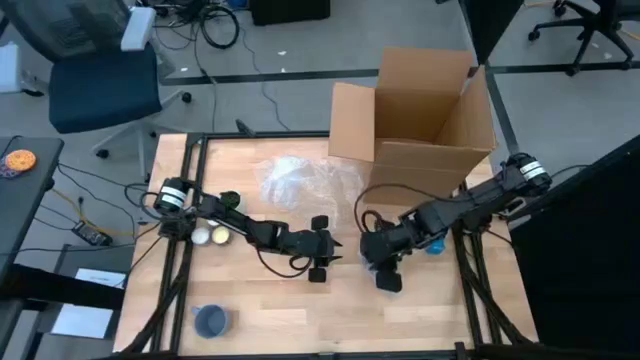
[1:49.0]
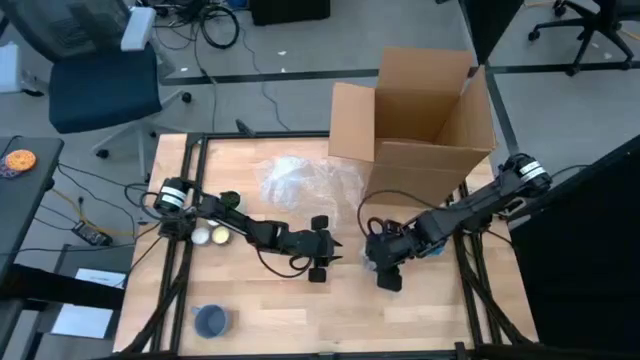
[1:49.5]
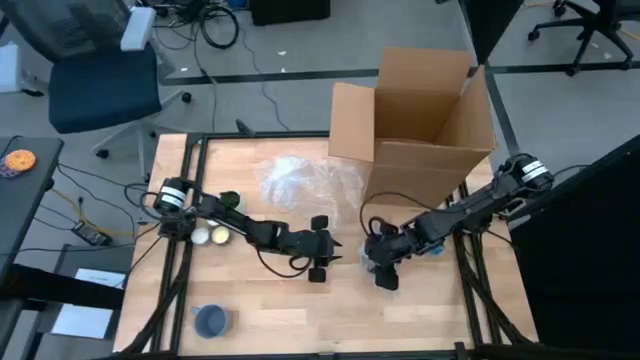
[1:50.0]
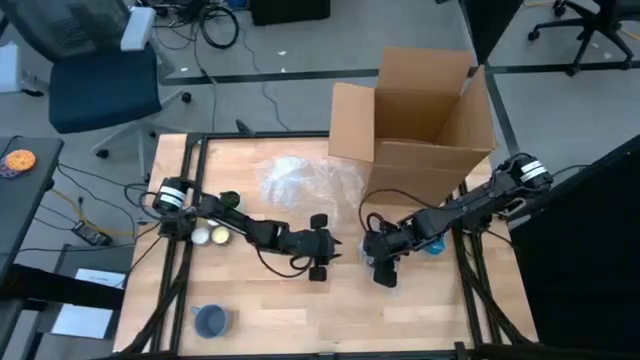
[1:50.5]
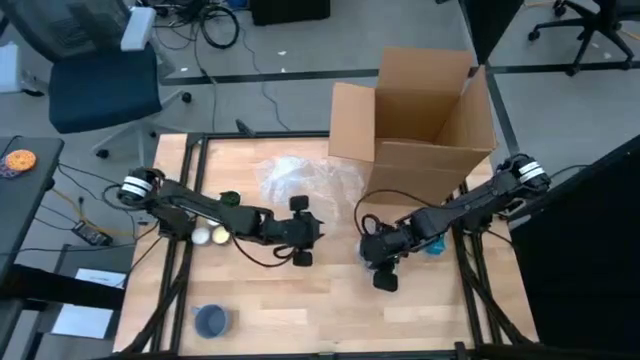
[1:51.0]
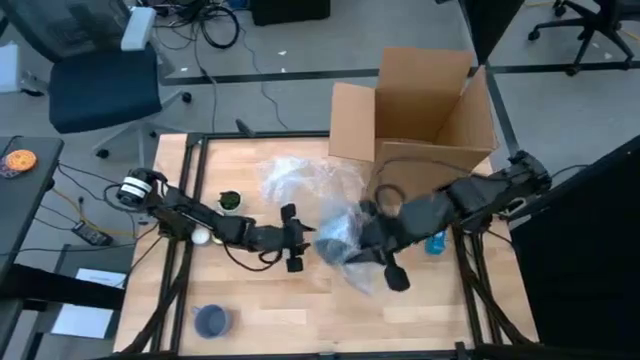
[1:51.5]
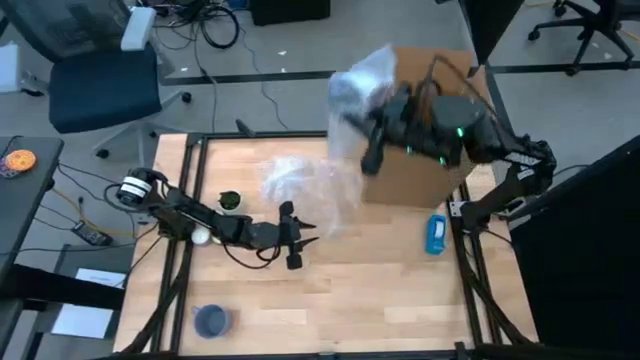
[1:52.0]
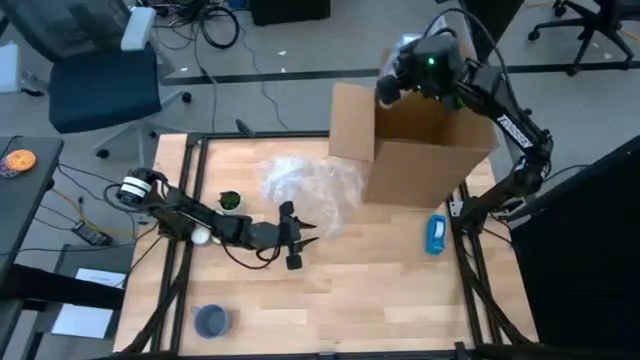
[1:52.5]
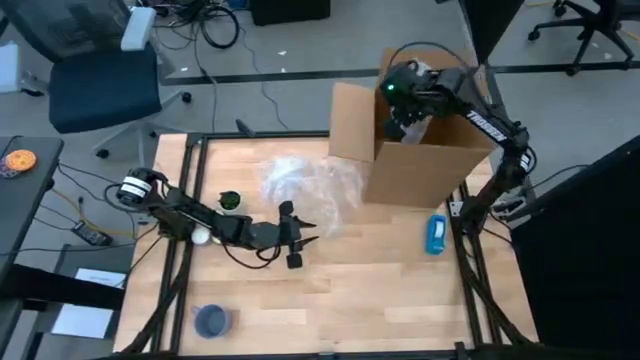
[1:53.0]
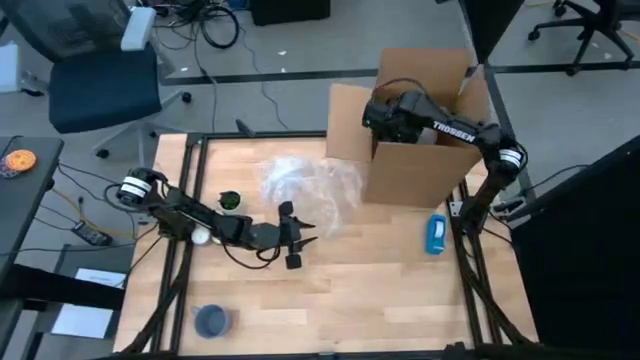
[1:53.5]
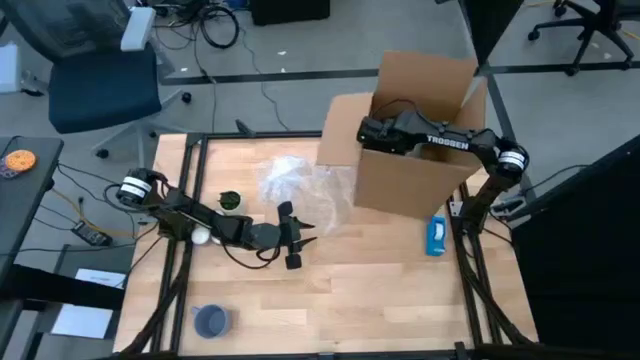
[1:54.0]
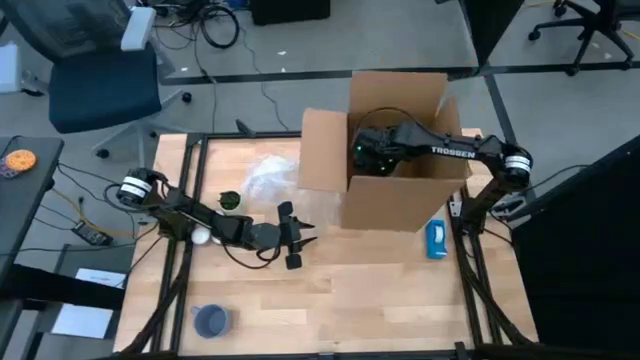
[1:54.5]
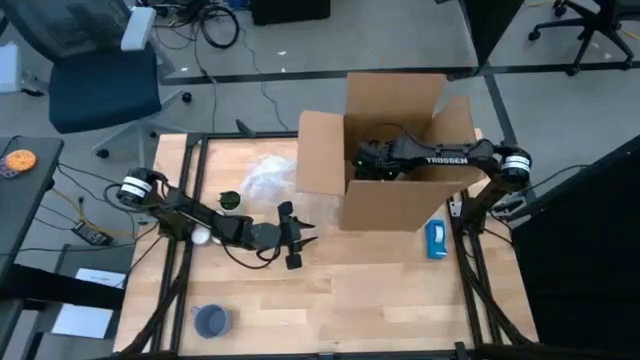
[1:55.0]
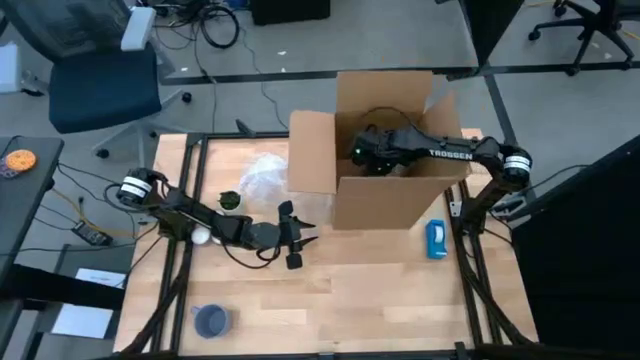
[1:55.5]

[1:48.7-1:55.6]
Task: wrap mug
Put the wrapped black mug into the cardboard box

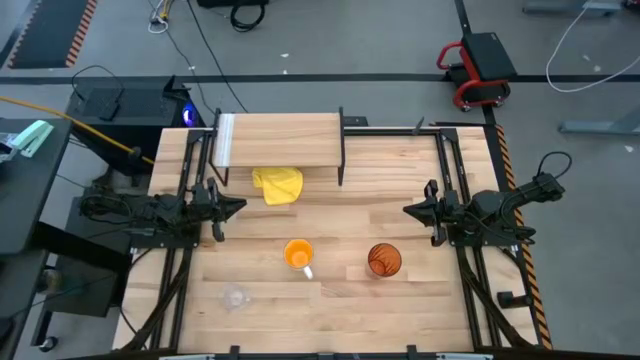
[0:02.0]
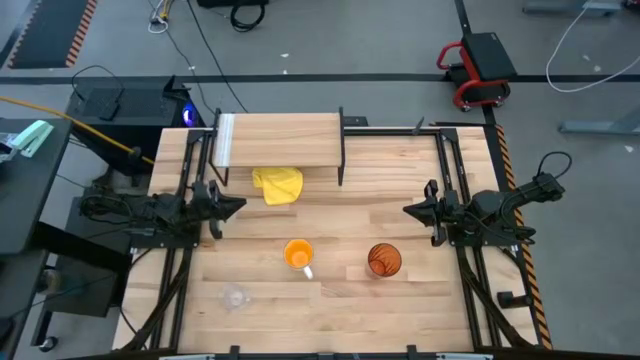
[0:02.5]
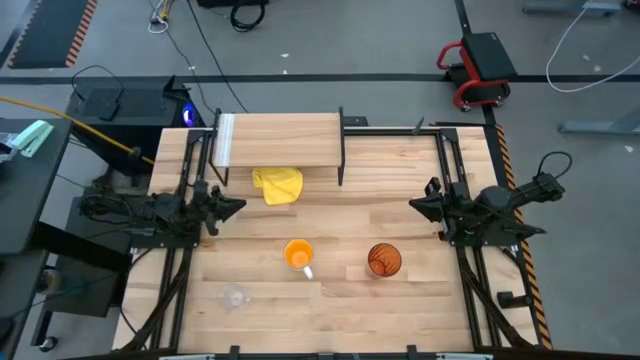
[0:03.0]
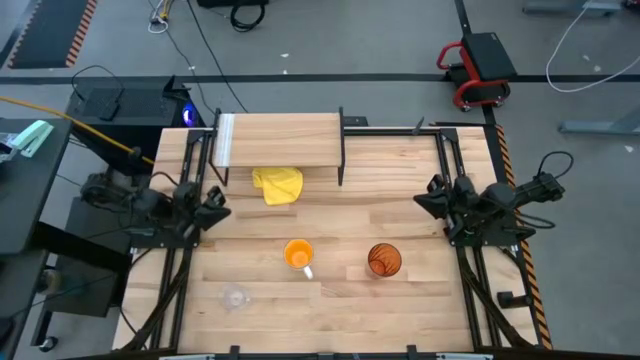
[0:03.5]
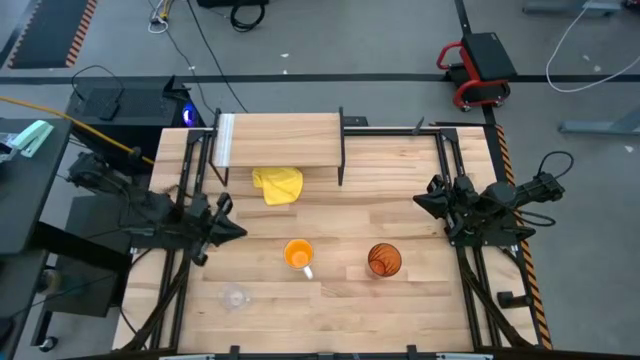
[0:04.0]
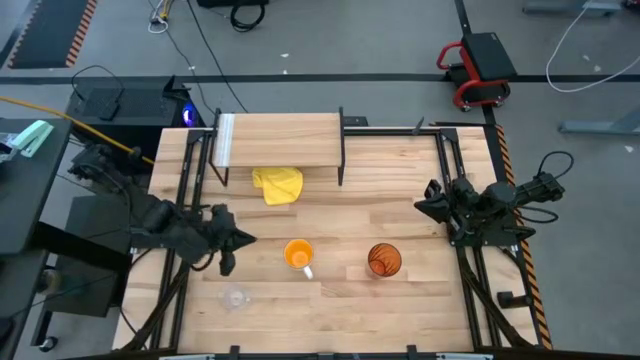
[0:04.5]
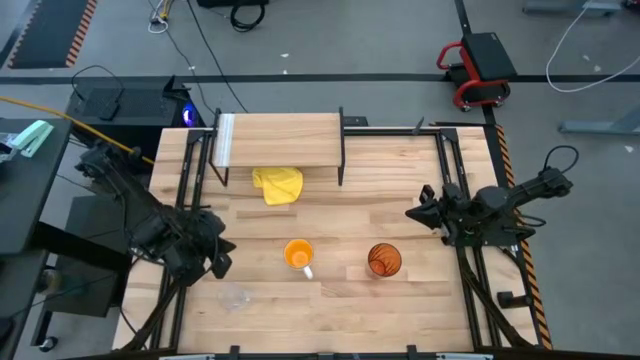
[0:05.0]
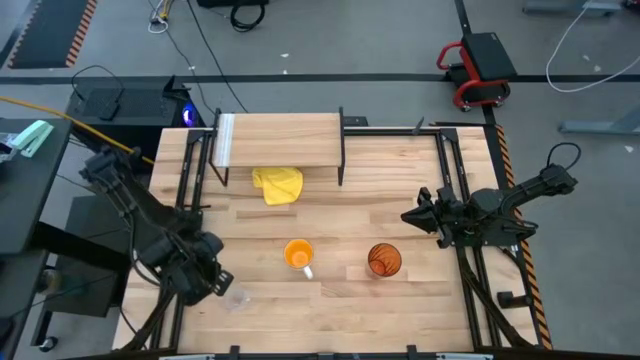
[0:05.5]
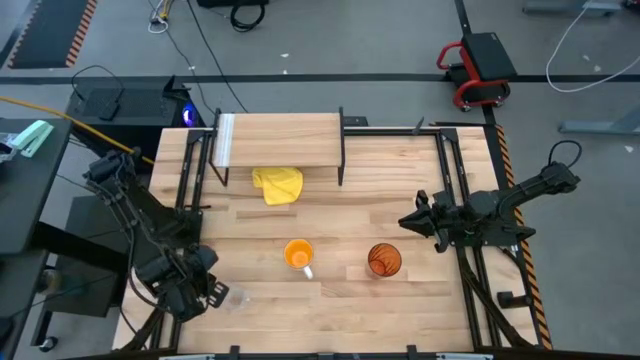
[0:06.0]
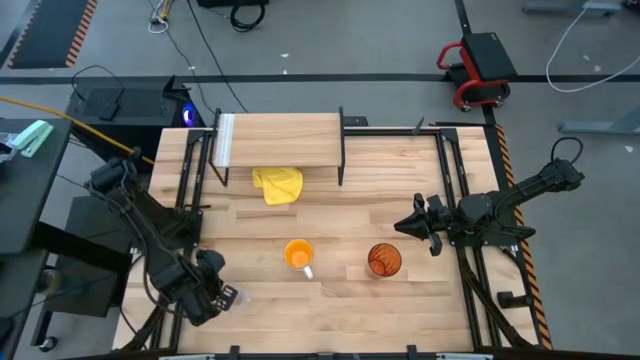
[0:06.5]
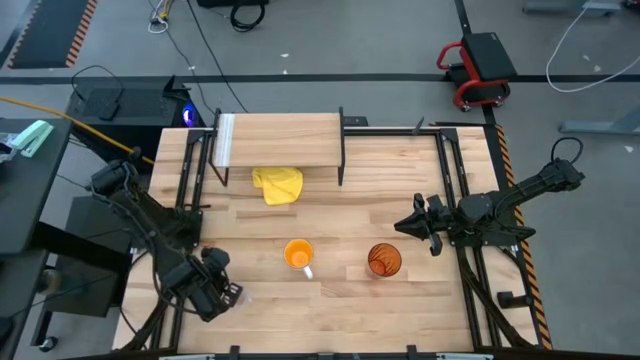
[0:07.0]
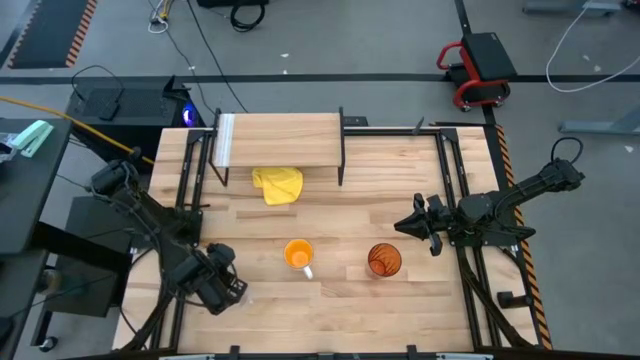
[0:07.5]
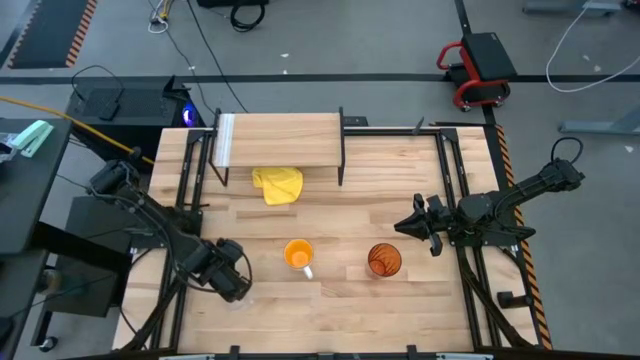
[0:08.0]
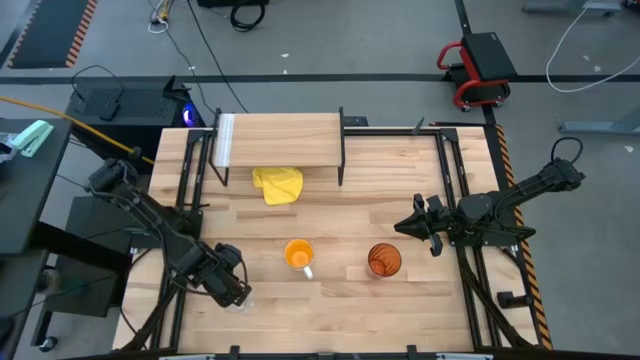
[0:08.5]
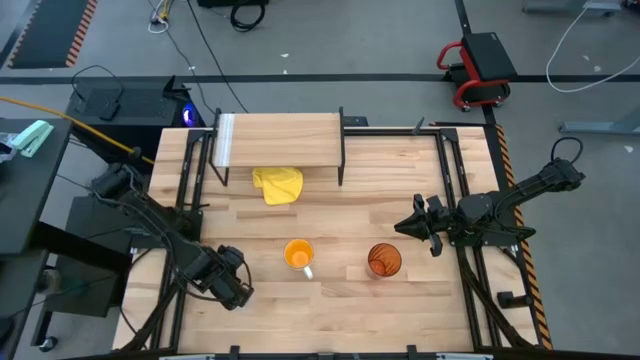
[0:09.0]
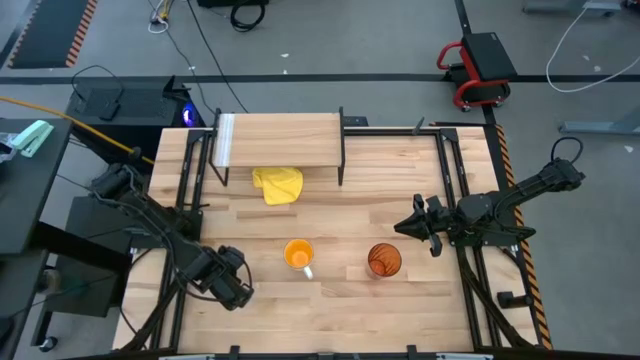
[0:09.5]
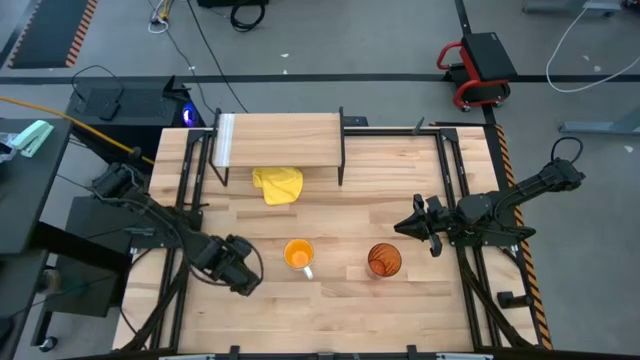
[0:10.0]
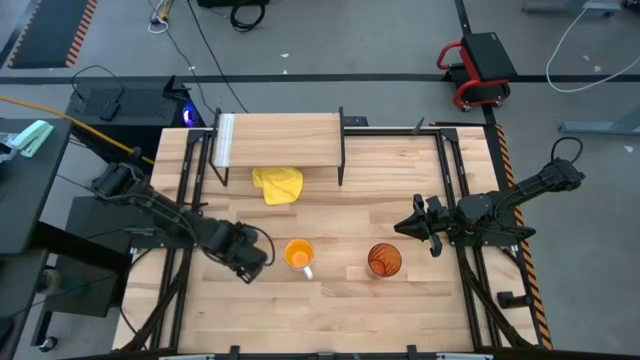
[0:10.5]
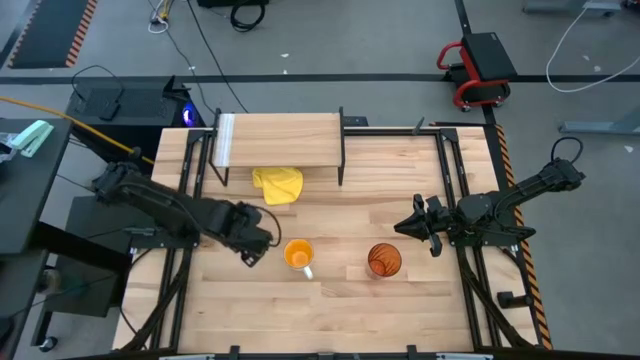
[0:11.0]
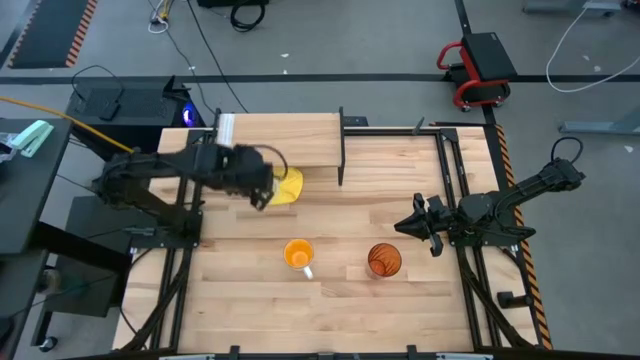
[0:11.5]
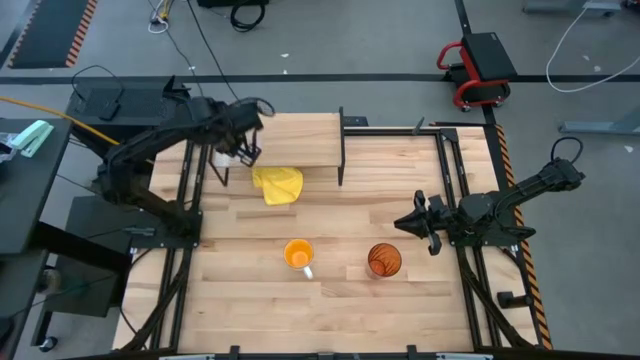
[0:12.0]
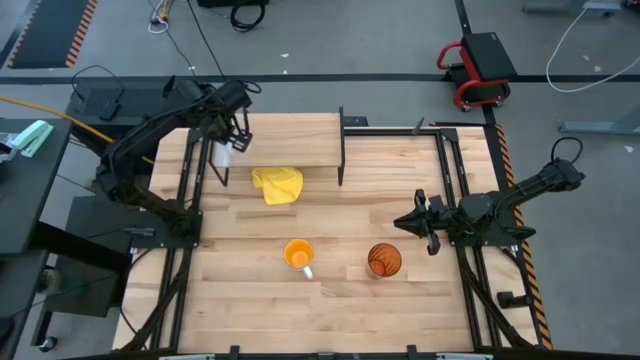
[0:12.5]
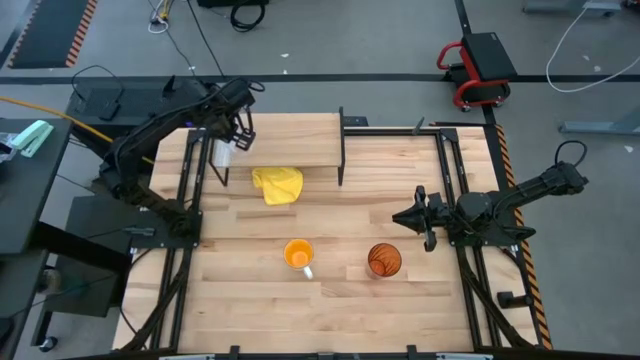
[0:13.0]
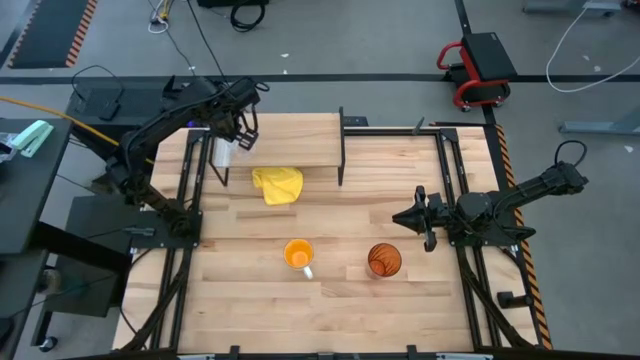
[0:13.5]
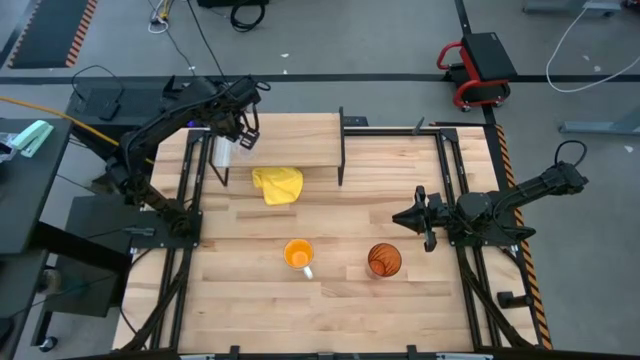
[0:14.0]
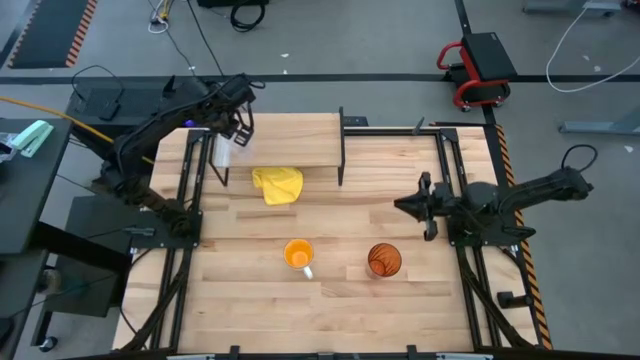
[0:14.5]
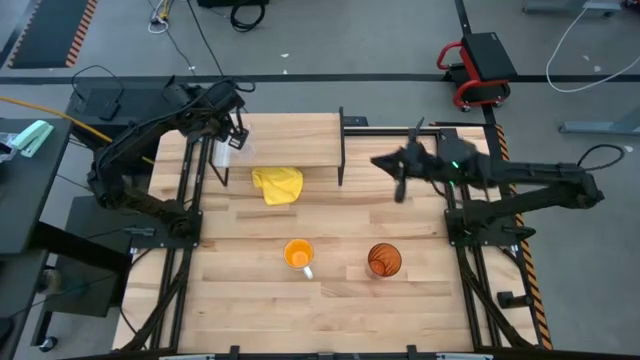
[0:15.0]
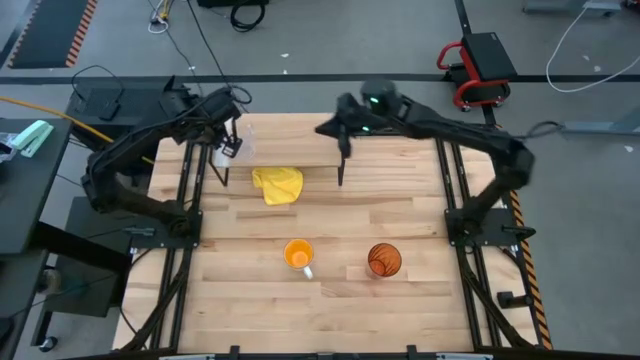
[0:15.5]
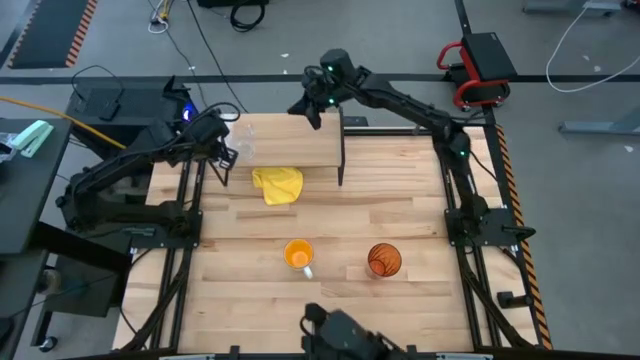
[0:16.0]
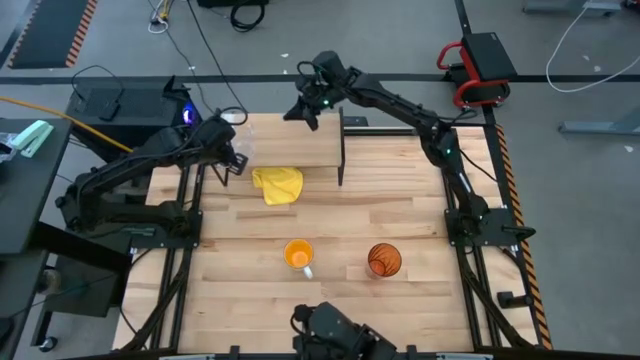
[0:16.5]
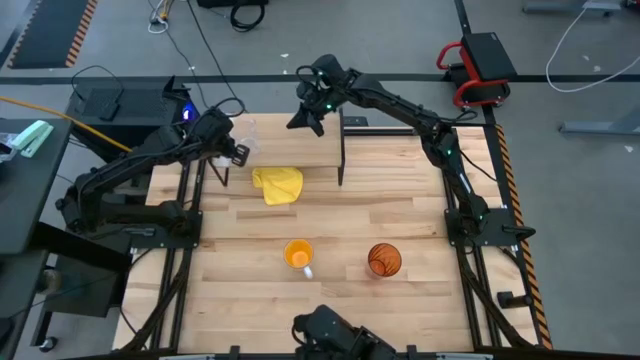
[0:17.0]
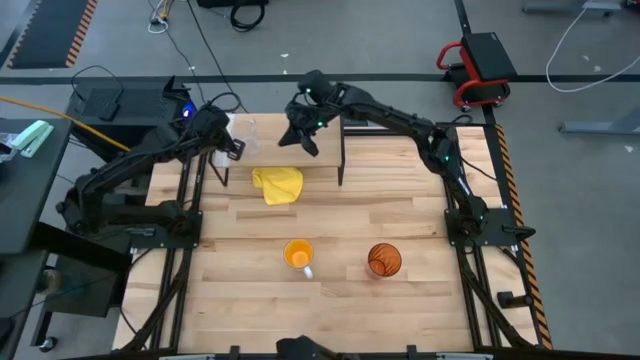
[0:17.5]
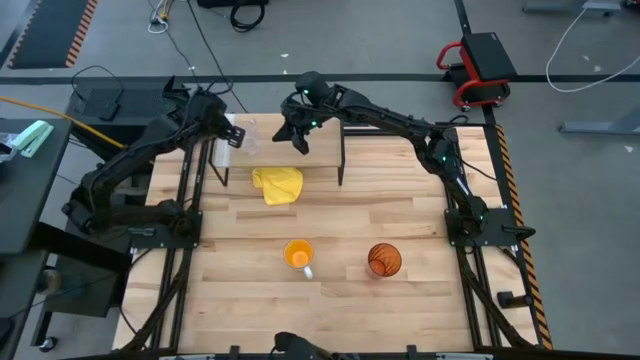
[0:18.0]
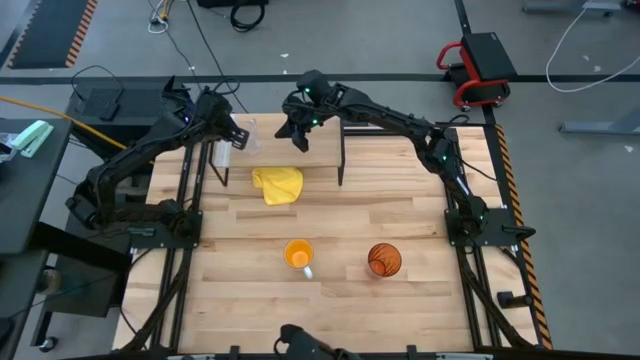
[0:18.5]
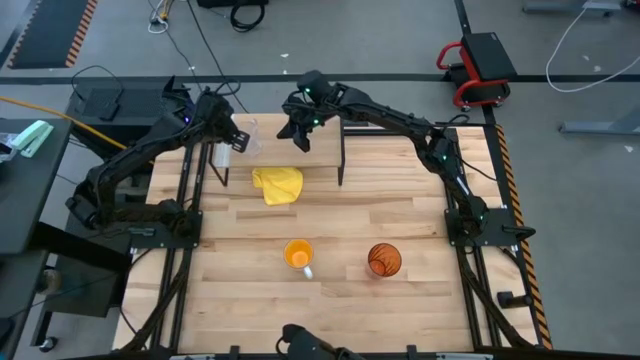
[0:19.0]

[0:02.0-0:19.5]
Task: Stack small to large cups/mugs on shelf
Put the transparent mug on the shelf
